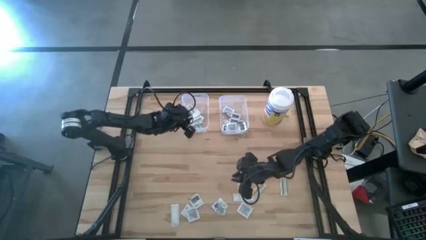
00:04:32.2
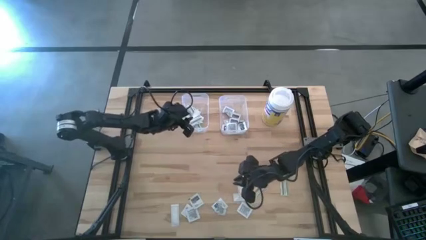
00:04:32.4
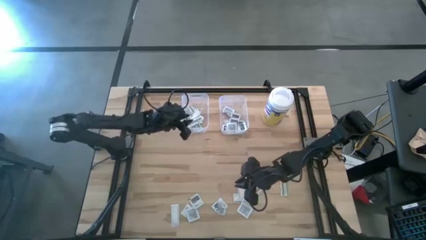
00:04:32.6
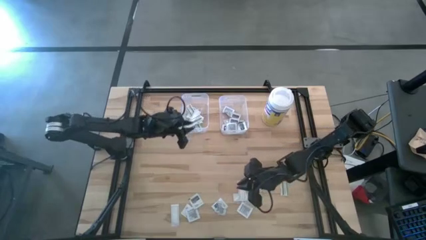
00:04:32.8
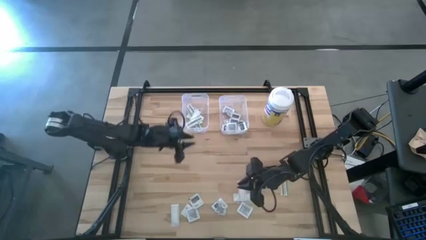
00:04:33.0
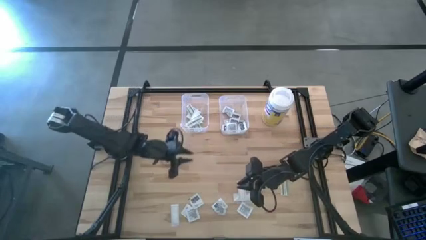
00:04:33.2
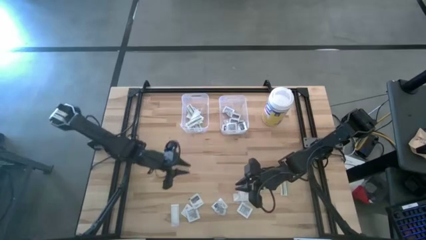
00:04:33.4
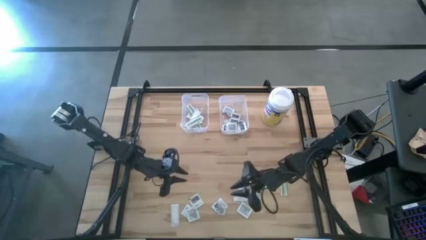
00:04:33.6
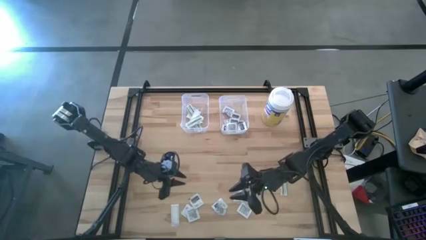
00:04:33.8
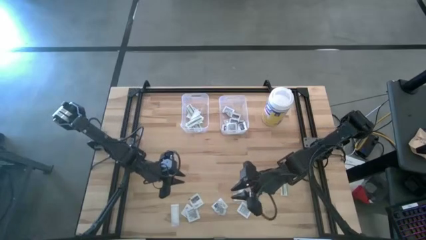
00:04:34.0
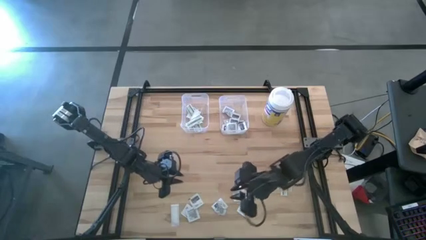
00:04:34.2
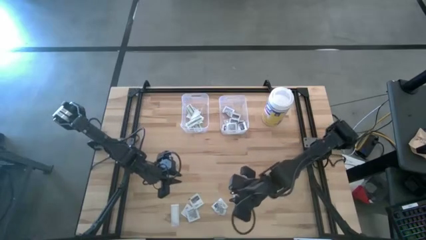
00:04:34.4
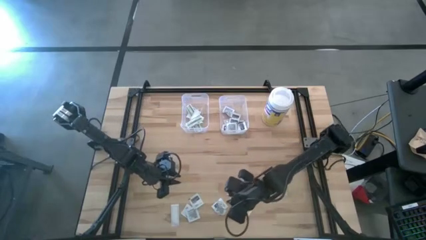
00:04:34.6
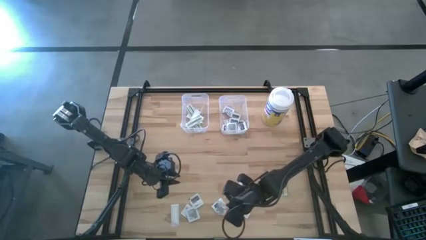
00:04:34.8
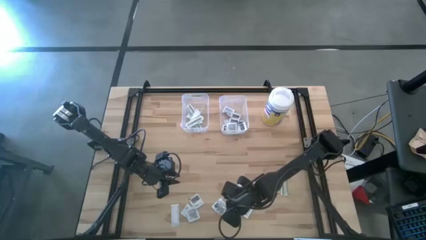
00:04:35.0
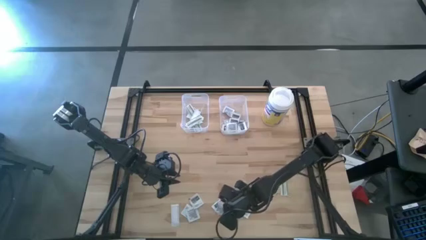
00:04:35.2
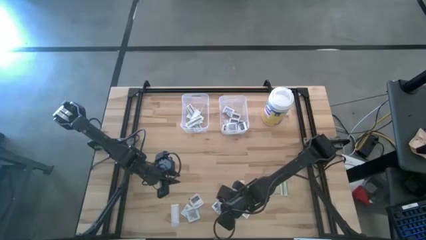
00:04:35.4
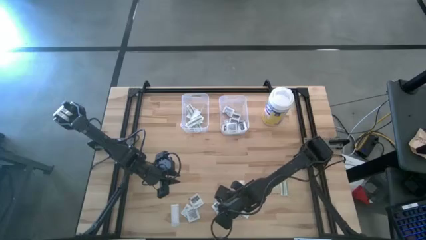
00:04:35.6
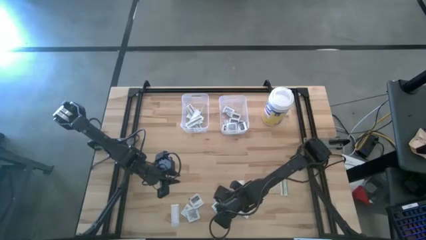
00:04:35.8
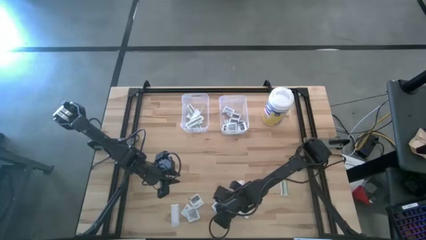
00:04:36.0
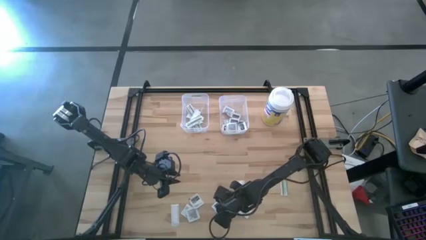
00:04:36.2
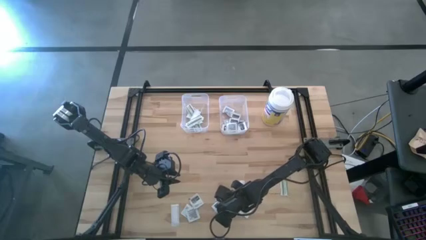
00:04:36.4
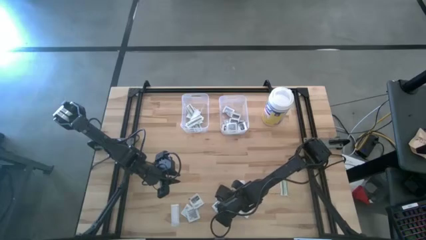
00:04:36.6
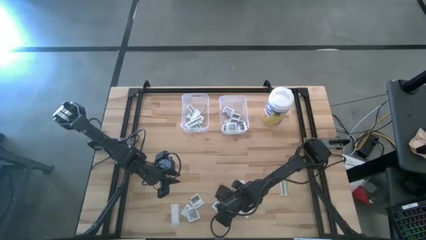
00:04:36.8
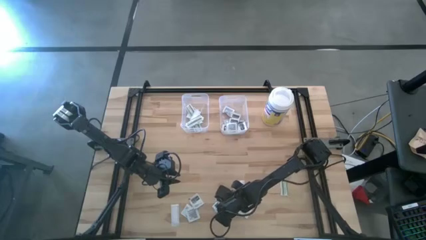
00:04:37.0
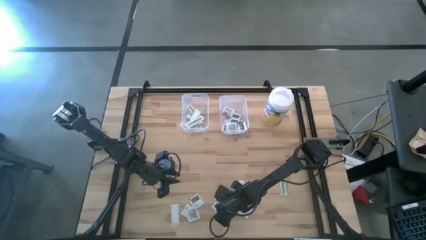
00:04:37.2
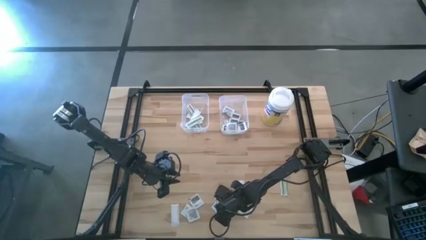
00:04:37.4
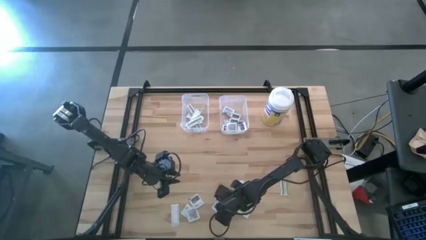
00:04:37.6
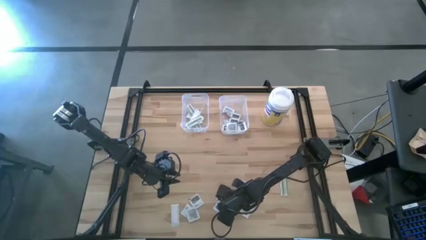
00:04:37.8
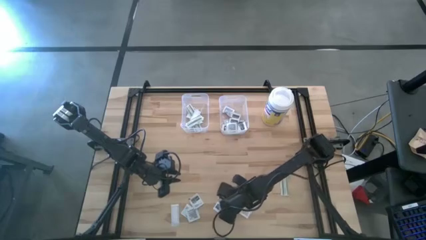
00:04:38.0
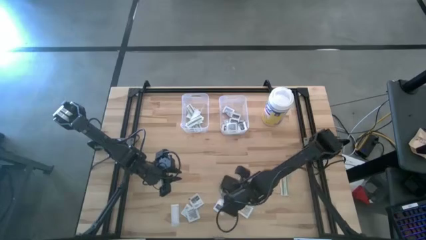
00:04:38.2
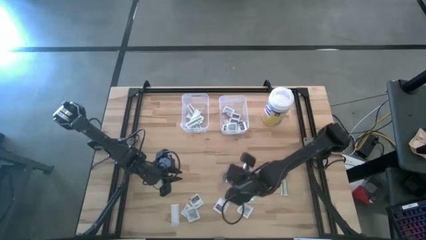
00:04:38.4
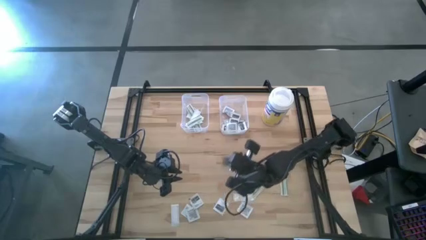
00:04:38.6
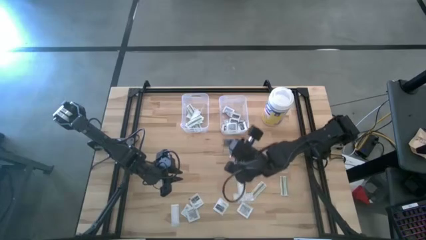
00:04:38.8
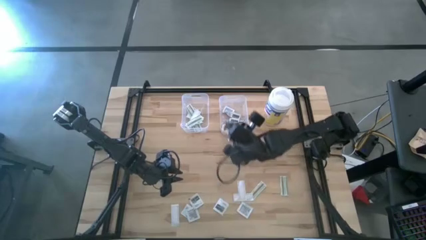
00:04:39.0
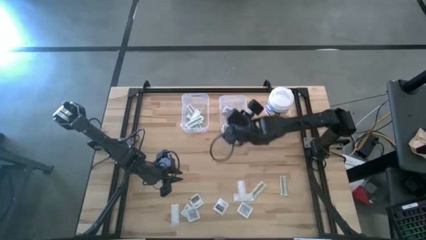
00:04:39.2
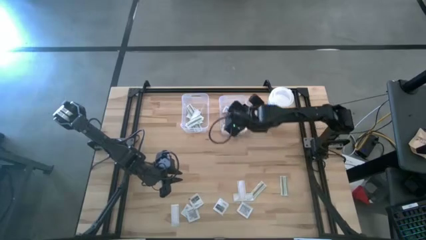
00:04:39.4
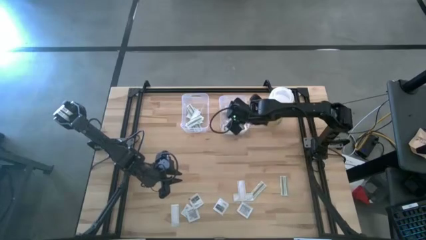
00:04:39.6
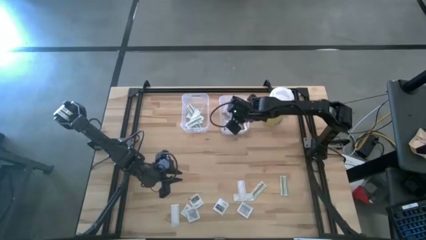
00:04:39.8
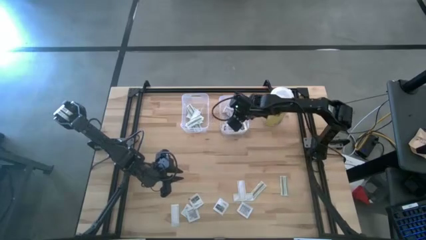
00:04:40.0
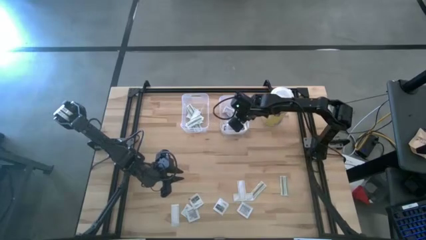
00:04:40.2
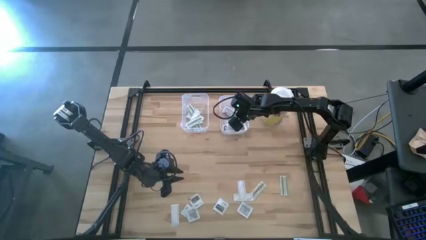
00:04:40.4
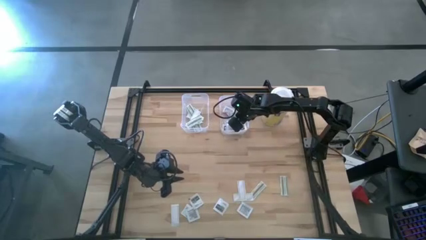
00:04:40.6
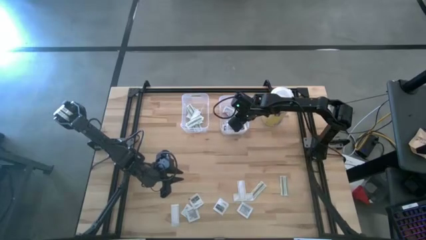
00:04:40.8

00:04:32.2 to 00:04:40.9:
Task: Pick & Place First Aid Supplies
Put the gray towelette pack into the right transparent bin

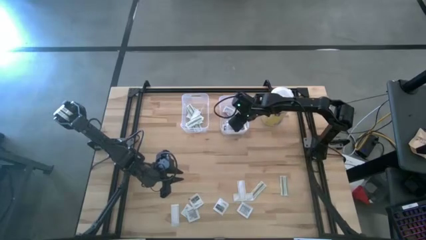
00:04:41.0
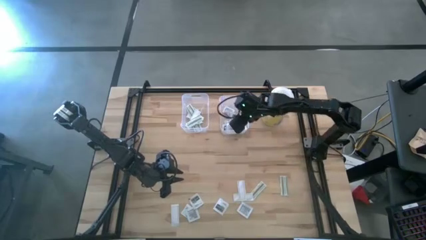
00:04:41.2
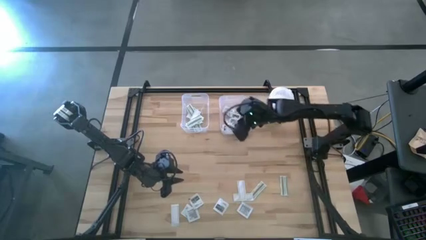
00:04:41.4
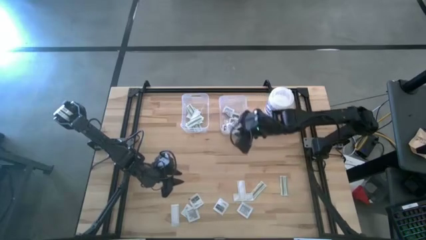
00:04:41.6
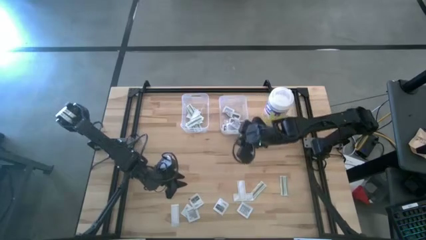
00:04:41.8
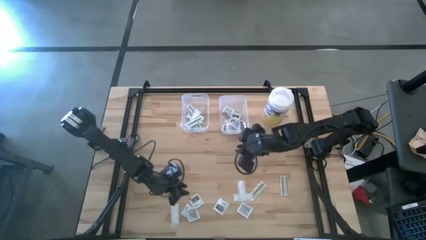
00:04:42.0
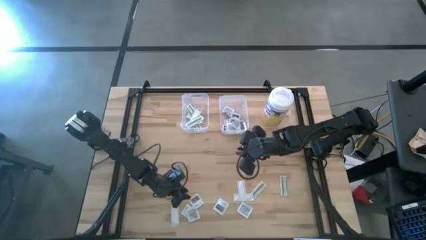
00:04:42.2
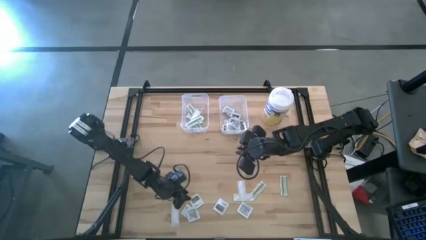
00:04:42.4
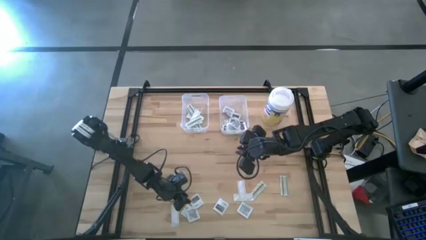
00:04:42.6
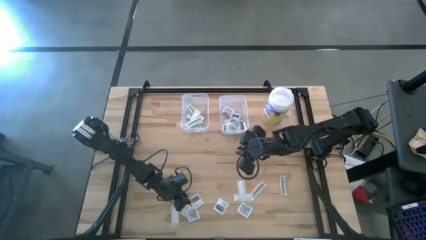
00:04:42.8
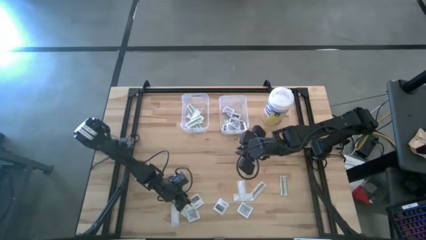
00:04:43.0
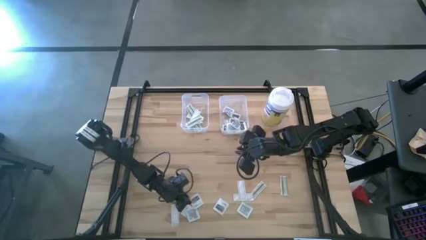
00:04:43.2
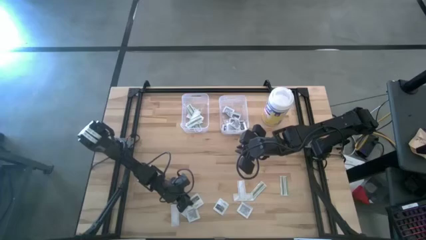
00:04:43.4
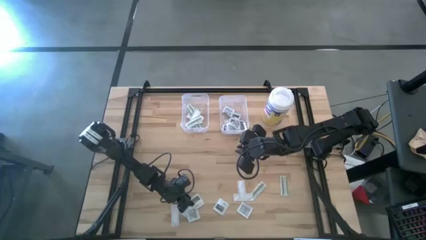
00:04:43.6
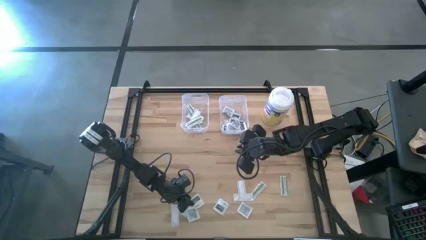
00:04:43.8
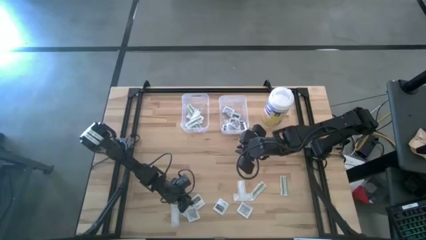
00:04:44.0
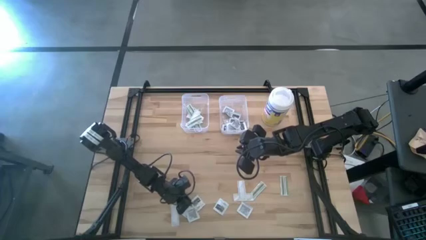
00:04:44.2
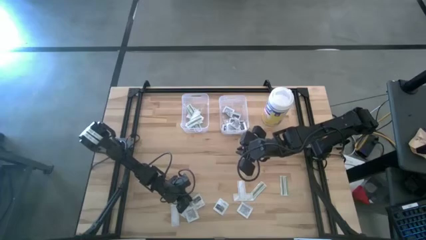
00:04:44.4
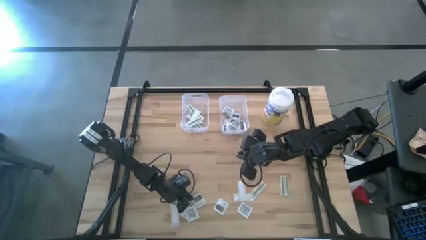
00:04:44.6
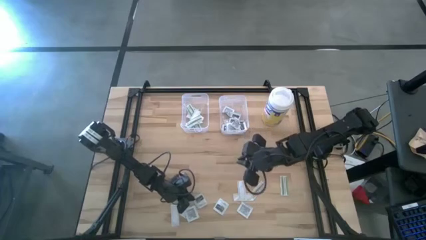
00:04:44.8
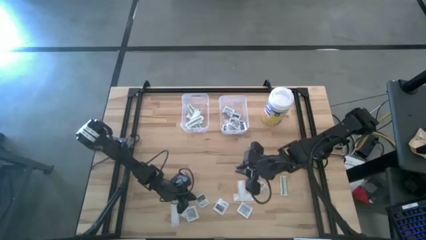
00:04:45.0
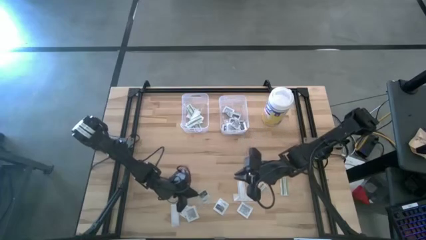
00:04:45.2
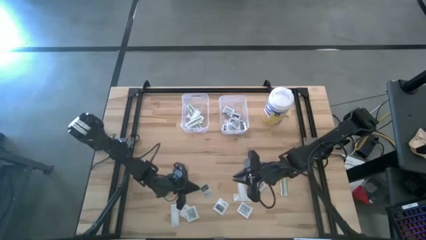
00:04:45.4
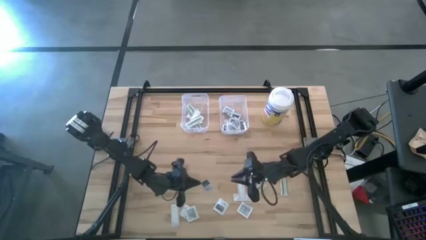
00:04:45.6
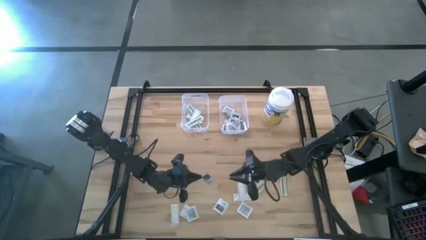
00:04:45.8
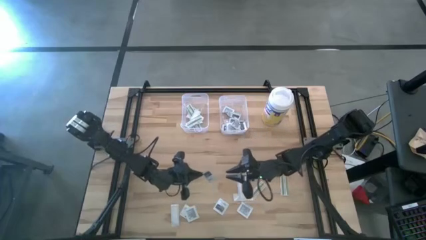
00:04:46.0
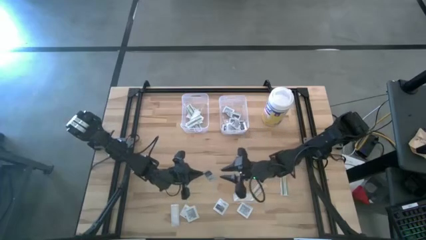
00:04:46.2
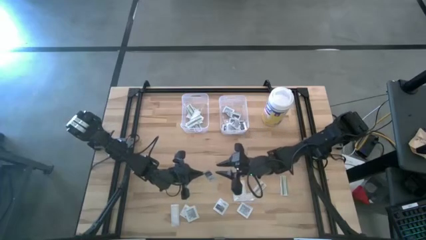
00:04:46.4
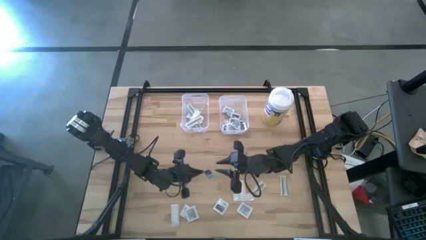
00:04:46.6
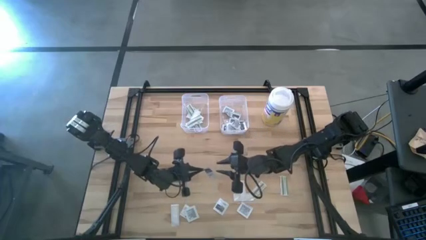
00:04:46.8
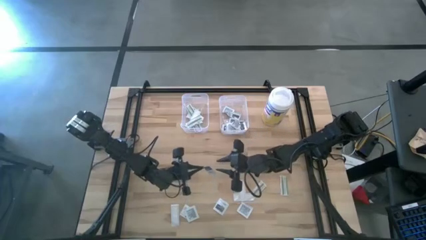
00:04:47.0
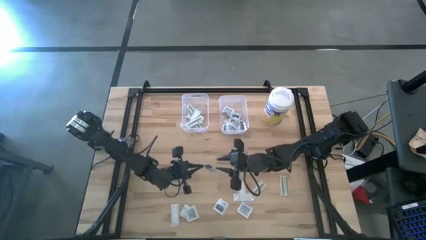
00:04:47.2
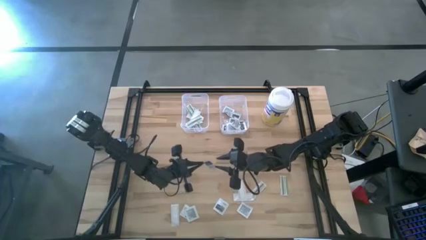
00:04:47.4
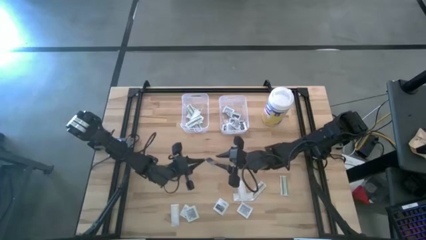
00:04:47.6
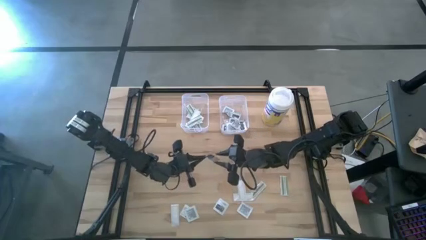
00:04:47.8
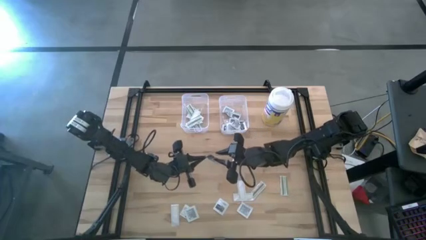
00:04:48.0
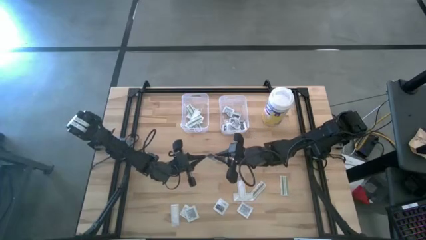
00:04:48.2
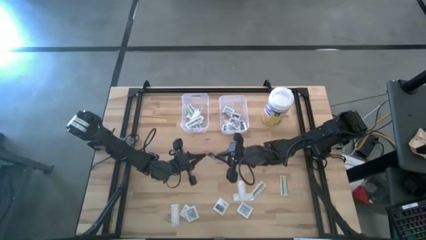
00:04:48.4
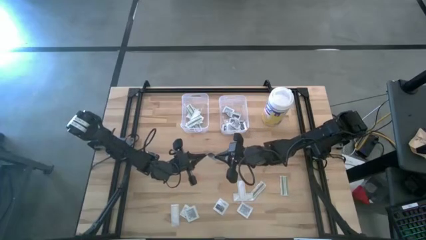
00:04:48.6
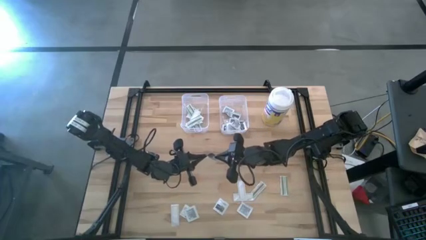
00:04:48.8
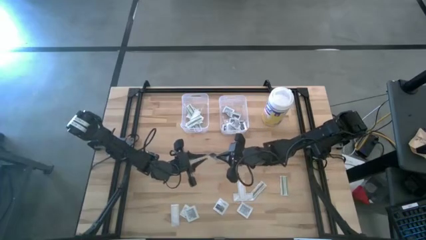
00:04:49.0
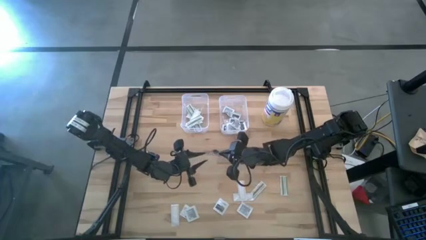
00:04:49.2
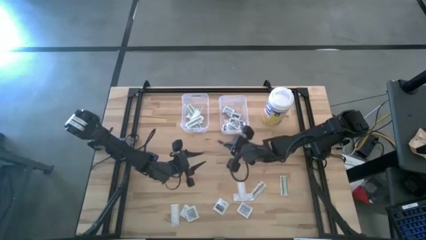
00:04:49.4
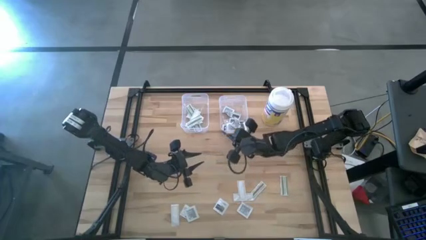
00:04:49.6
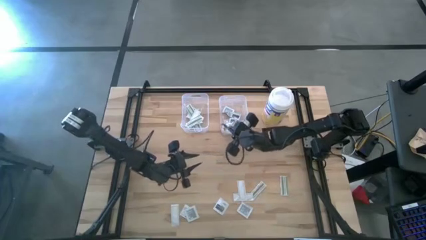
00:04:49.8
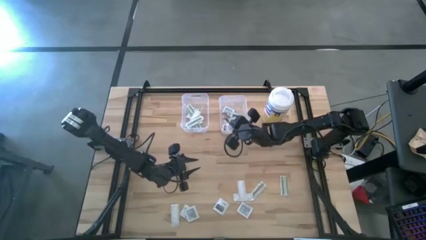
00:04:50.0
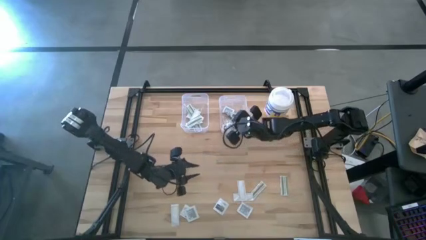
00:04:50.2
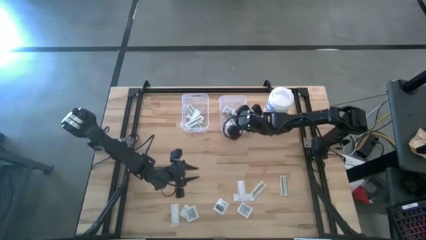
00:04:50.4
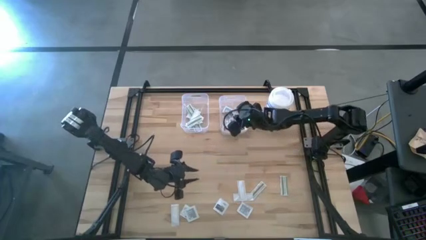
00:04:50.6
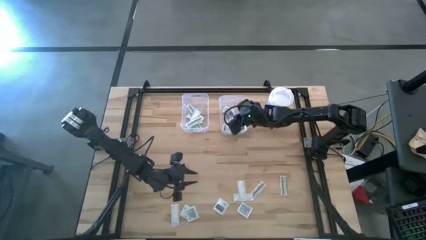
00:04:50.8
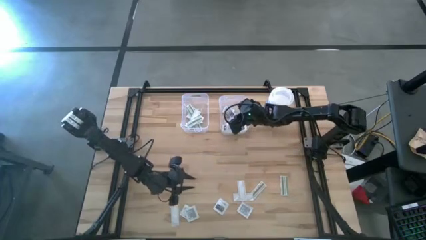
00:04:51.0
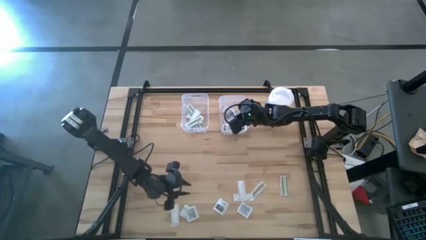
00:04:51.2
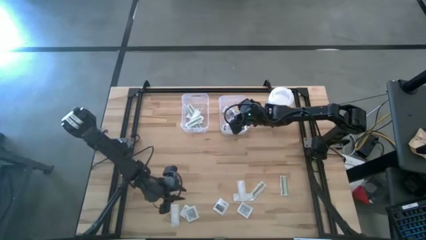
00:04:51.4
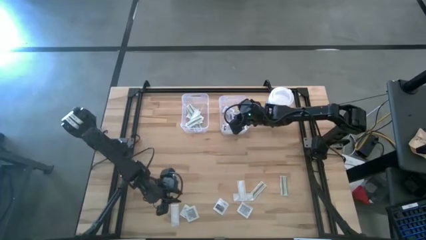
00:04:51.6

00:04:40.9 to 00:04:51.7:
Put the gray towelette pack into the right transparent bin
